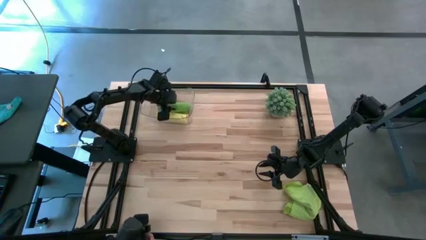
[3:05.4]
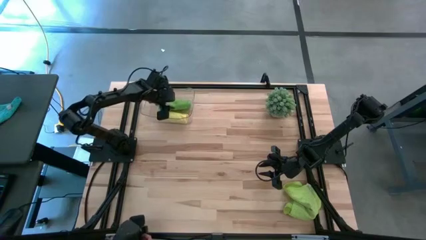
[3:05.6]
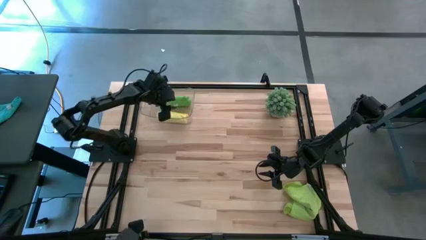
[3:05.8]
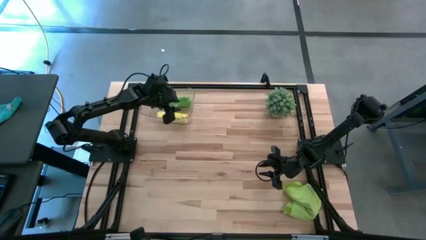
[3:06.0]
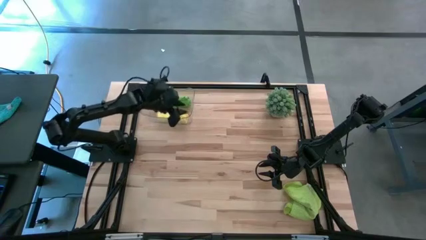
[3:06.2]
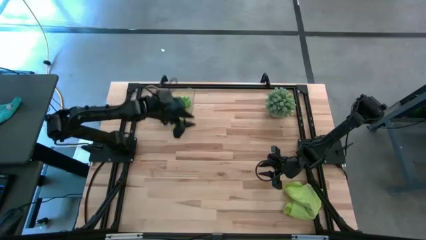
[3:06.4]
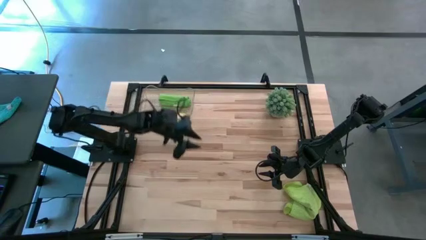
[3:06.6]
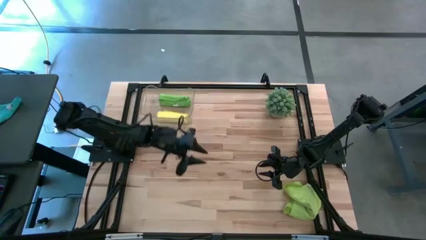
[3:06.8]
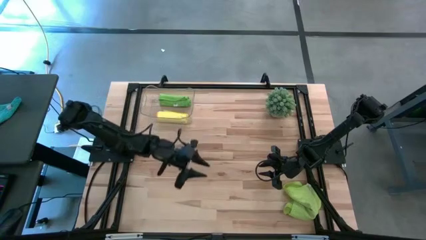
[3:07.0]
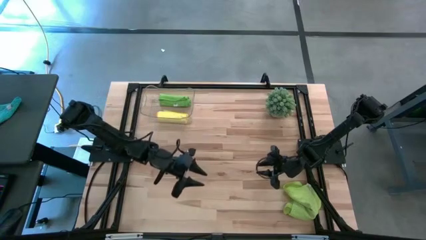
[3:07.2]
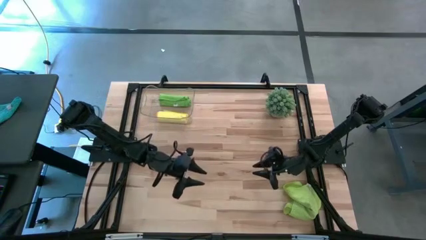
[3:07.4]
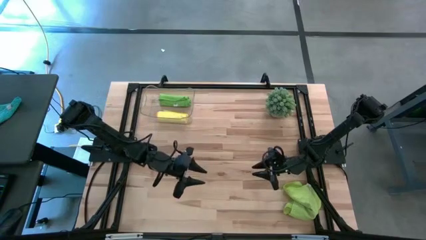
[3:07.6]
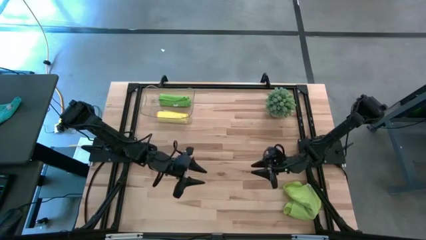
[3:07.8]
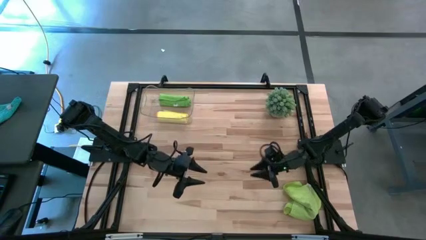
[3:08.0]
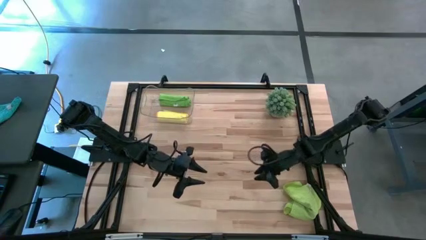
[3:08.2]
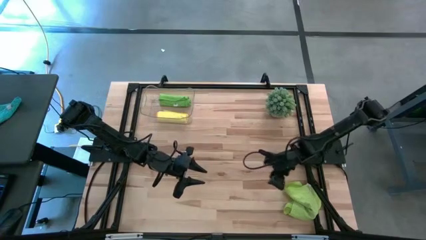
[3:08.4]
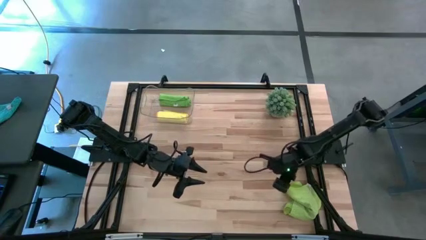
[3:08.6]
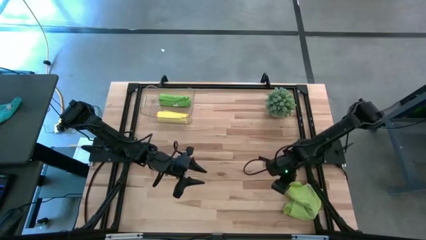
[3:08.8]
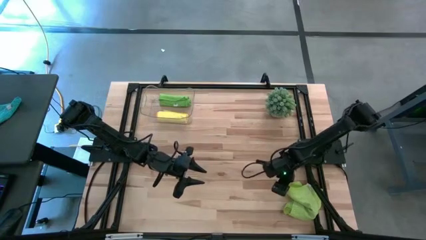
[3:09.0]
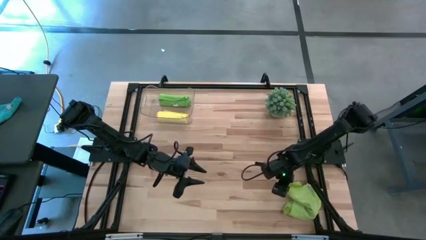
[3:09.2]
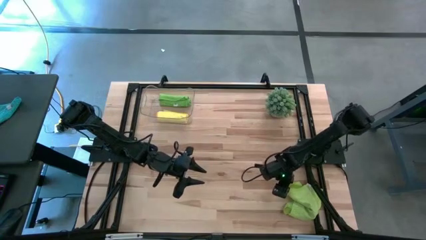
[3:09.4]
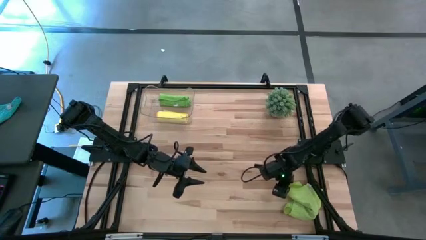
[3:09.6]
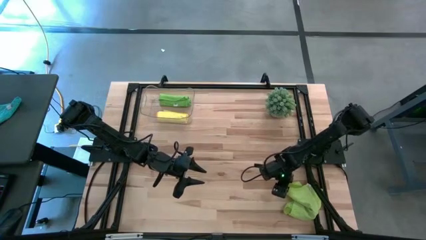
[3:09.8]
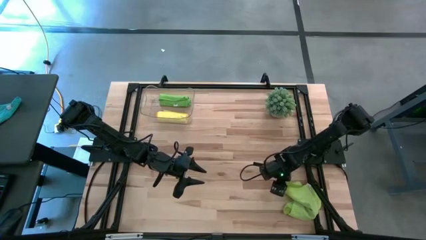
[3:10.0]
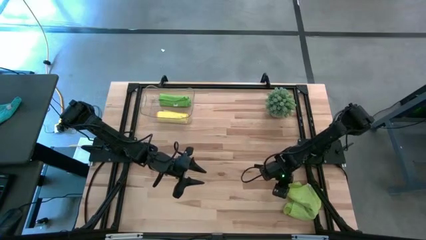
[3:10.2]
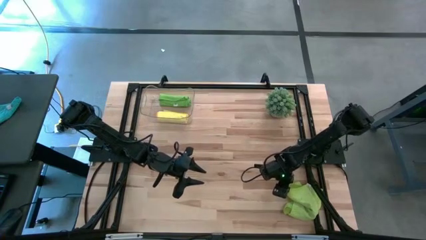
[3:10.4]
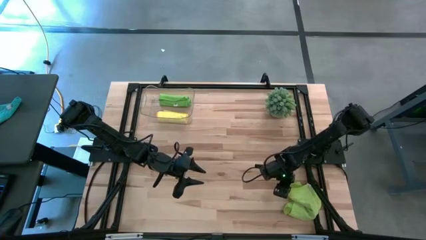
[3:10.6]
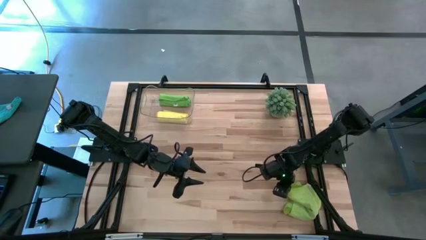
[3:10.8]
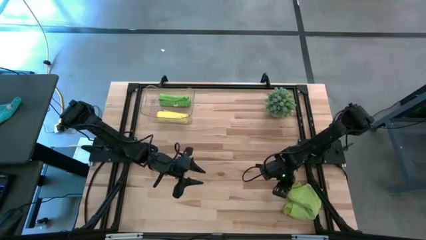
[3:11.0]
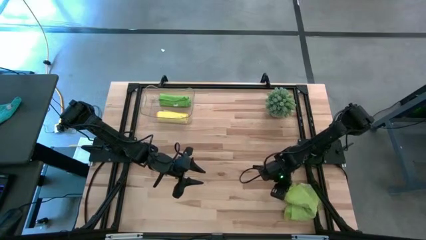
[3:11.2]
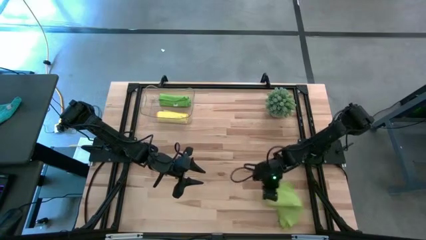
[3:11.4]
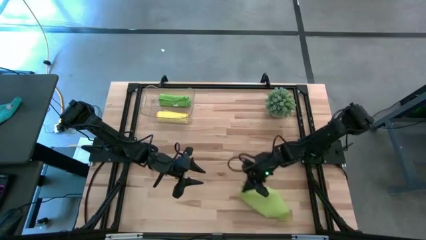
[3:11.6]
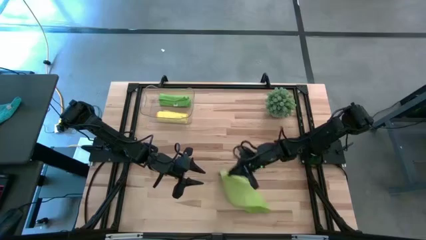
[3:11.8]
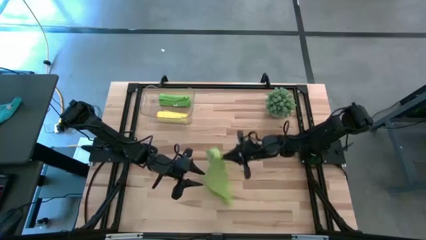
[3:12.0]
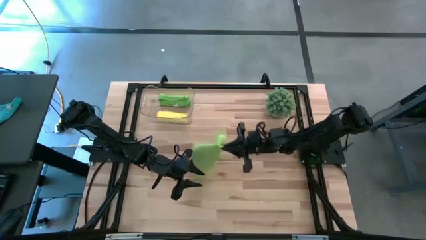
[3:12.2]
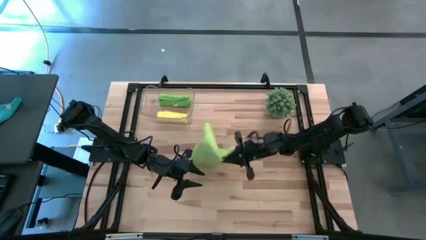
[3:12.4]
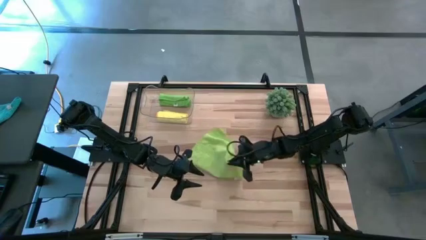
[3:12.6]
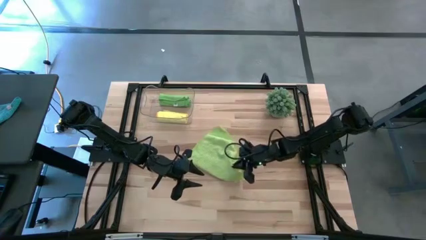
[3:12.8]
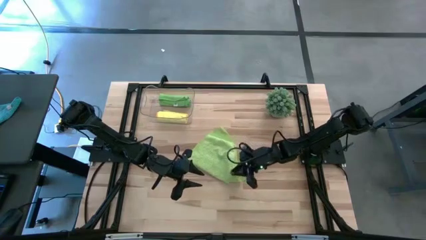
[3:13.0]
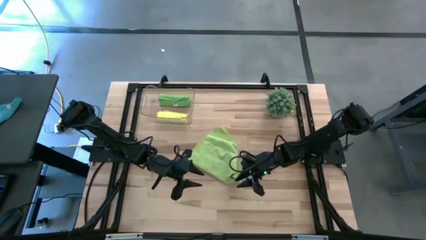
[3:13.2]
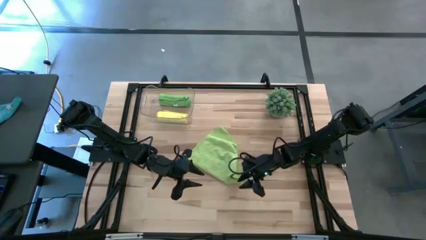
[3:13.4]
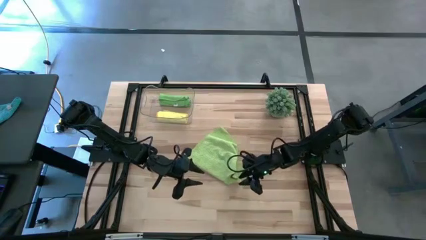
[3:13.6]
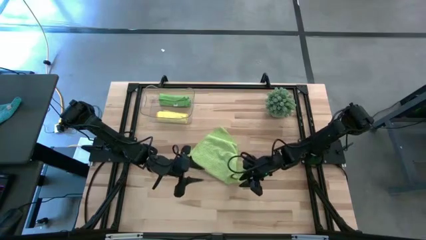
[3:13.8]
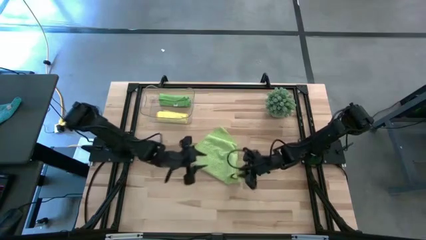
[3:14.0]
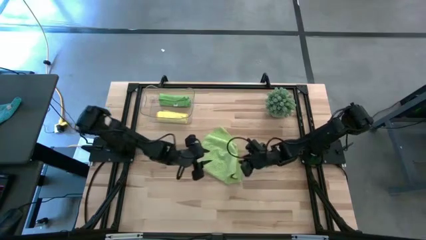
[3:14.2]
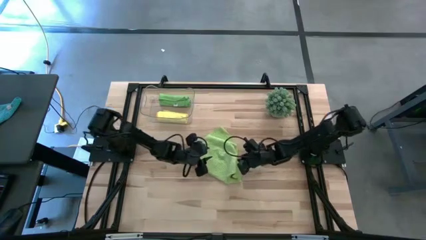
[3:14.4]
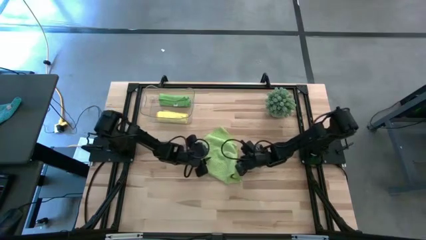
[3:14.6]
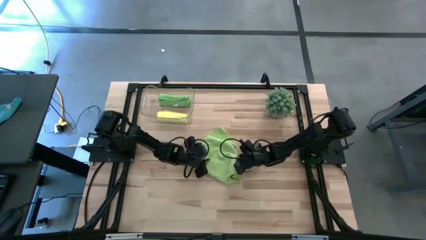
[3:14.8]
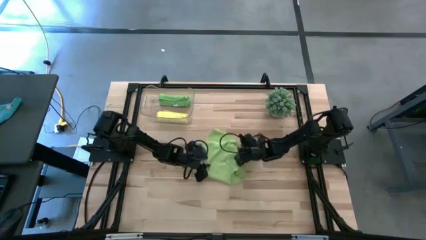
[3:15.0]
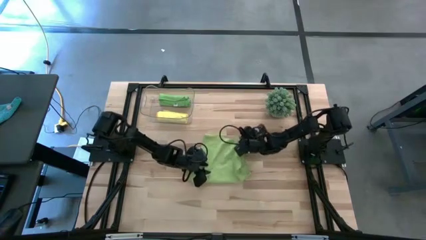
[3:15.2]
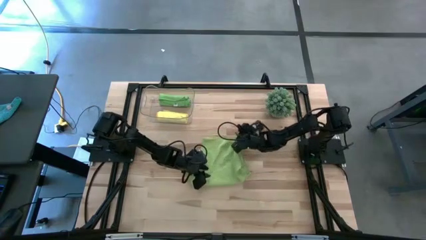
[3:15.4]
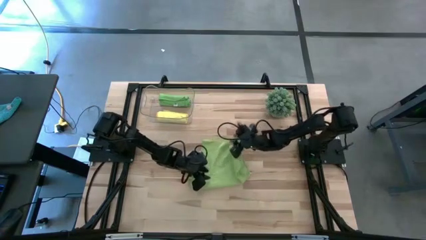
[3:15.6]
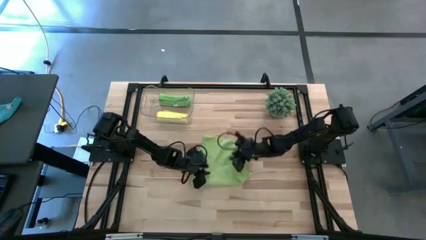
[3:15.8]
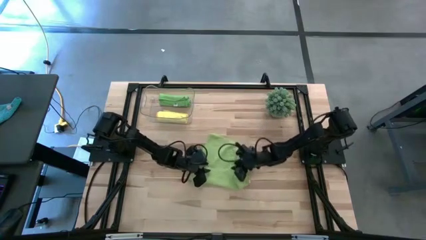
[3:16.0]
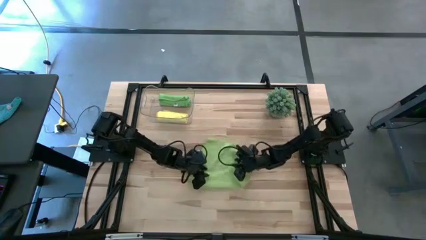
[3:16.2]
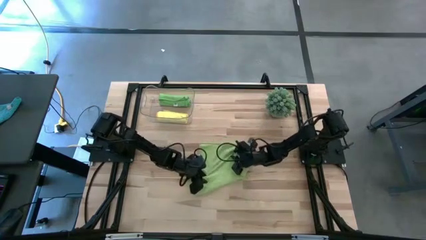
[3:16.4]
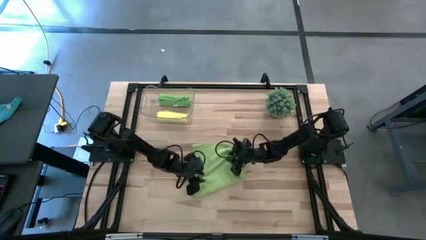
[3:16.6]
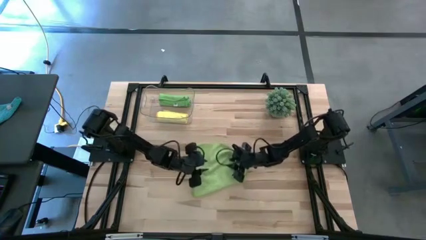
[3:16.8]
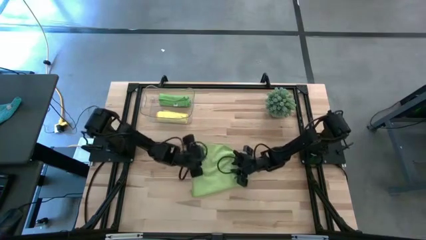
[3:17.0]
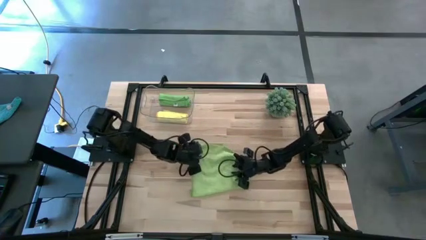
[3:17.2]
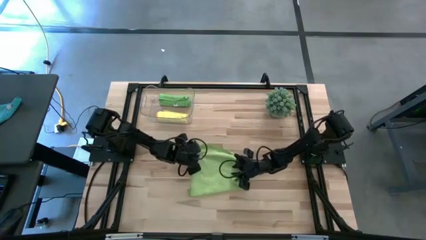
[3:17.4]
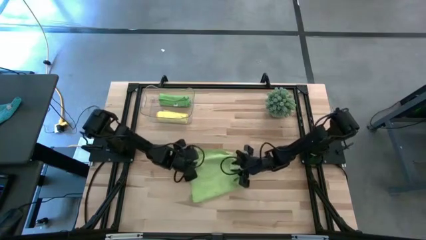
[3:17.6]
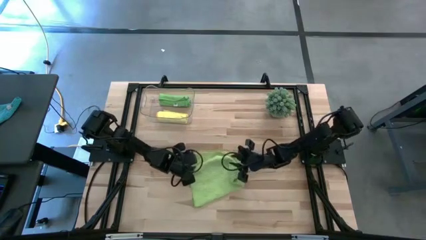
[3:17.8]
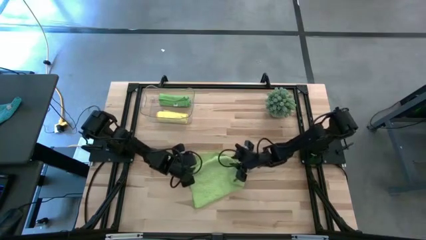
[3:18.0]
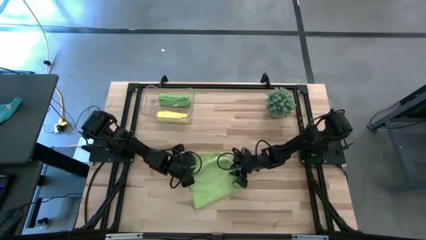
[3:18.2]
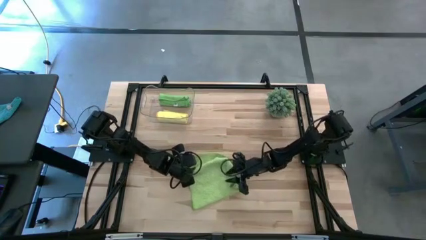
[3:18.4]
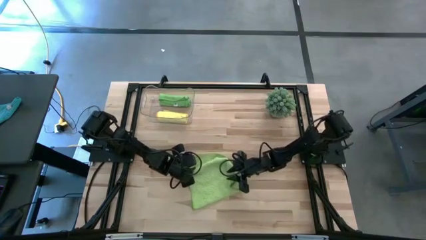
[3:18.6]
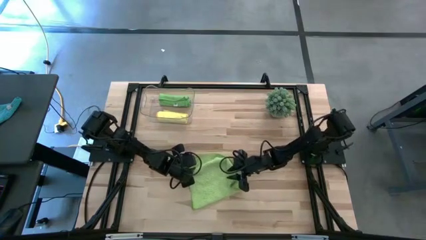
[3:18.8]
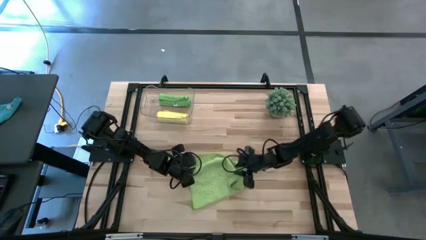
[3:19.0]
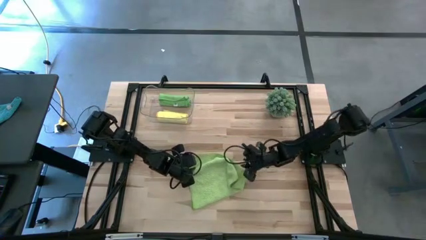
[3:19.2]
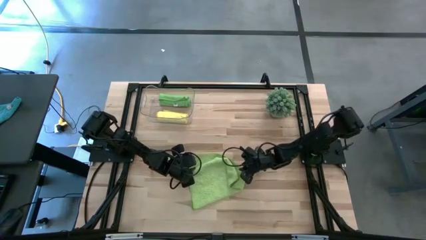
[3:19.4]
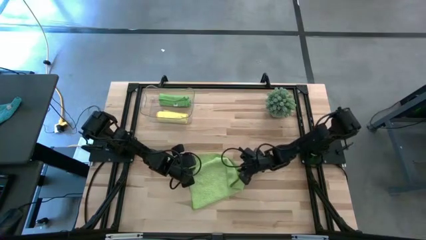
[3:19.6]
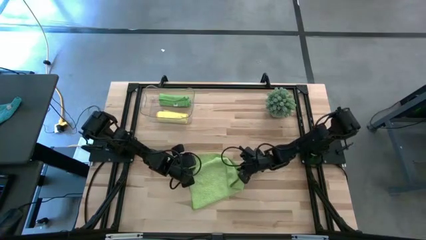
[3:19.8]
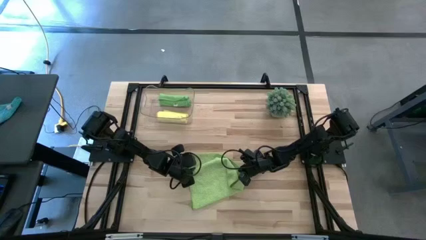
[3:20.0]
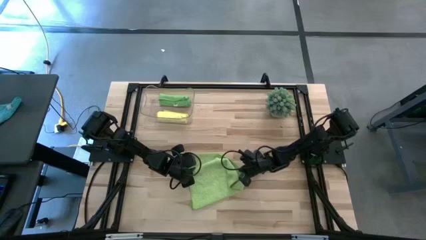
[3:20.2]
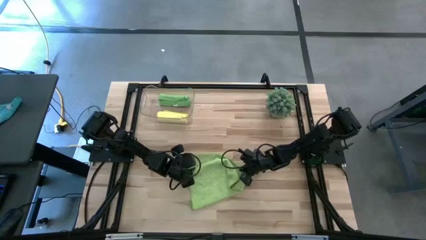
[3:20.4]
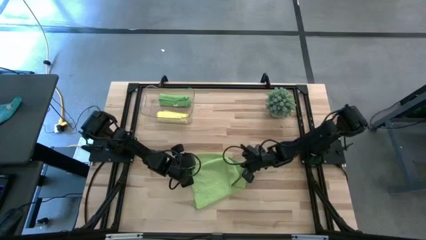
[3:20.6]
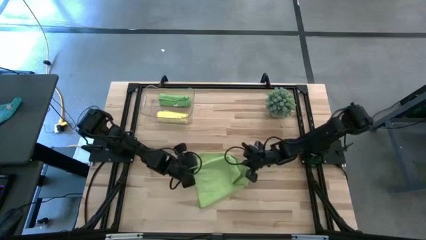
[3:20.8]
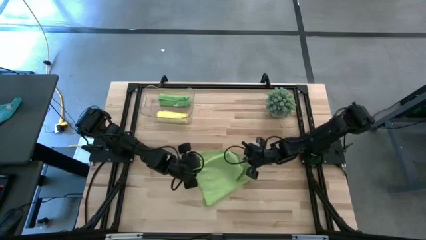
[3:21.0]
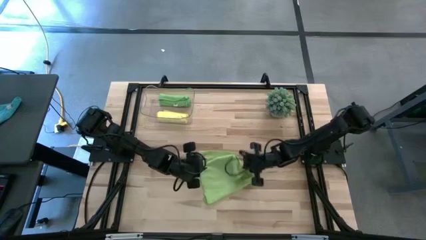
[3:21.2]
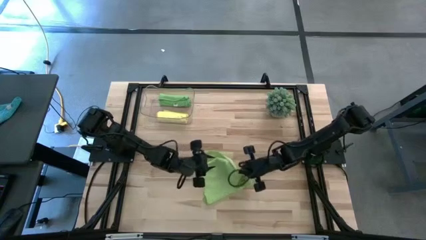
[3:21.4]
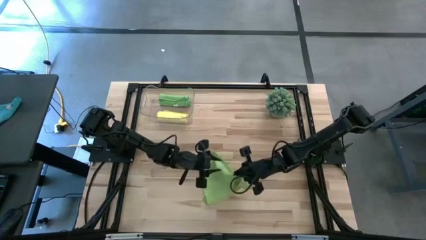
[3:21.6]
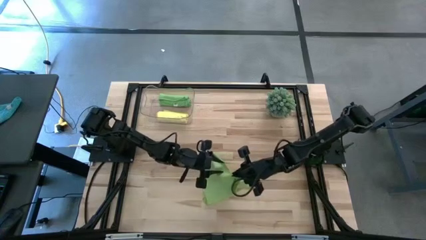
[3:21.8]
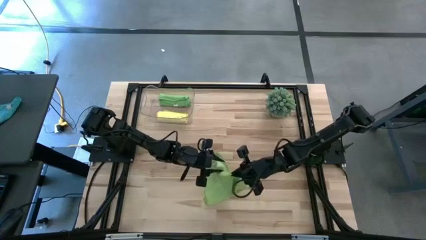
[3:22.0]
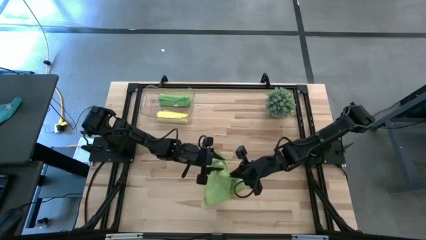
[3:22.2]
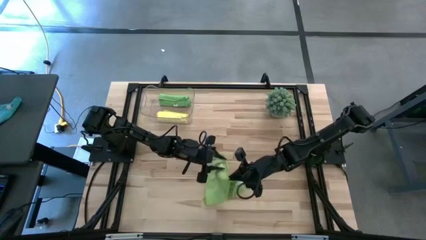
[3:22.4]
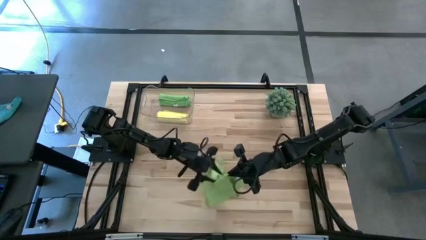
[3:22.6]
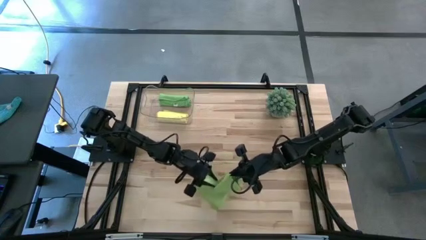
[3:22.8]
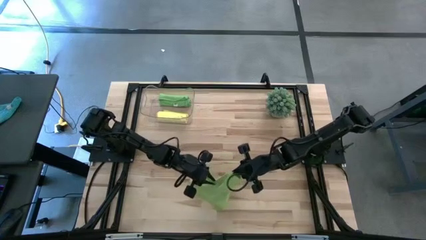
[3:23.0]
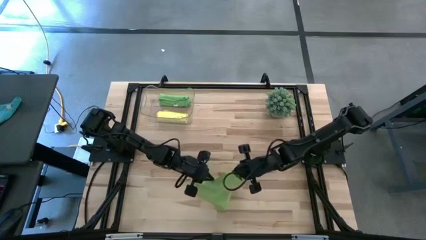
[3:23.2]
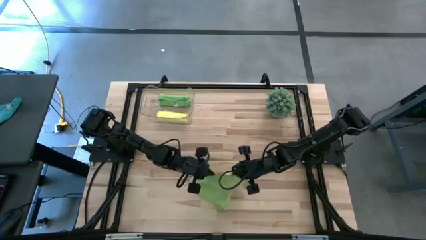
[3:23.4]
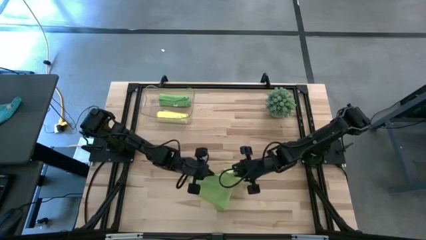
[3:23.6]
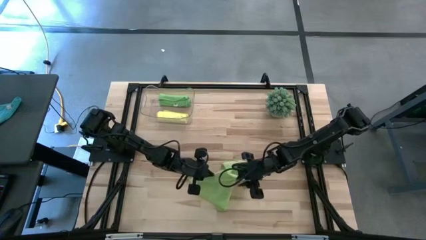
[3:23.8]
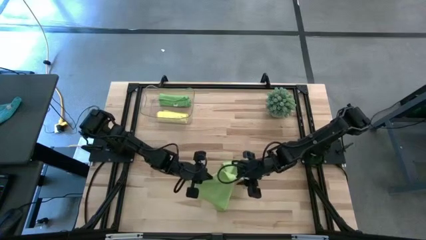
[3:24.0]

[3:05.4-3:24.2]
Task: Roll microfiber towels into tight, uniform cylinder then place into a basket
Fold the light green microfiber cloth
